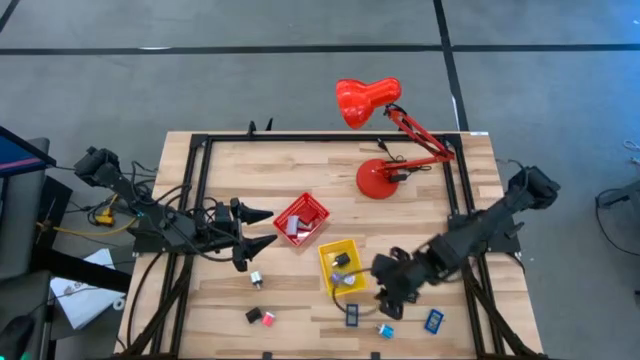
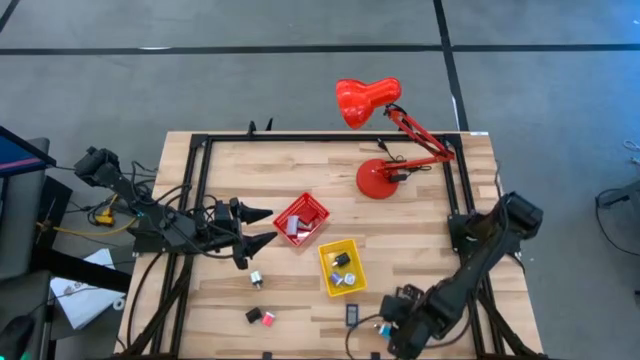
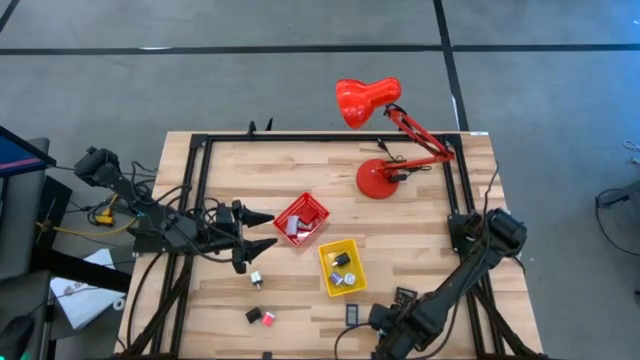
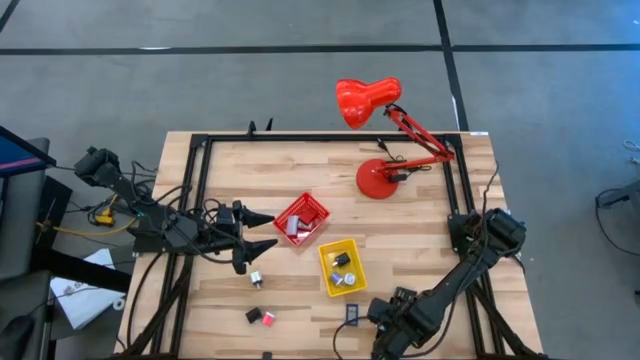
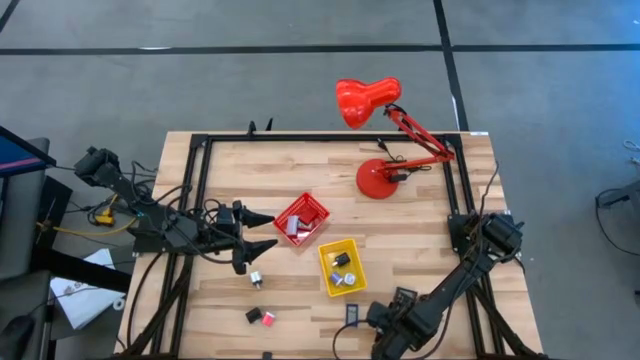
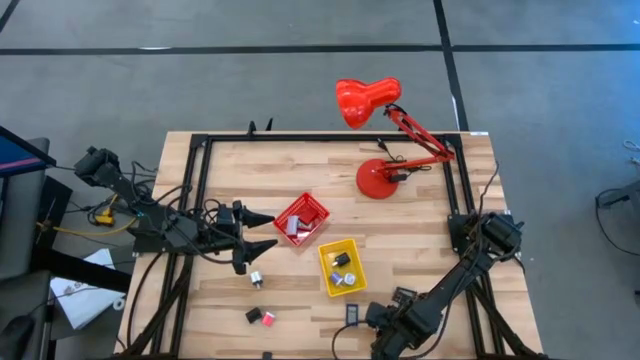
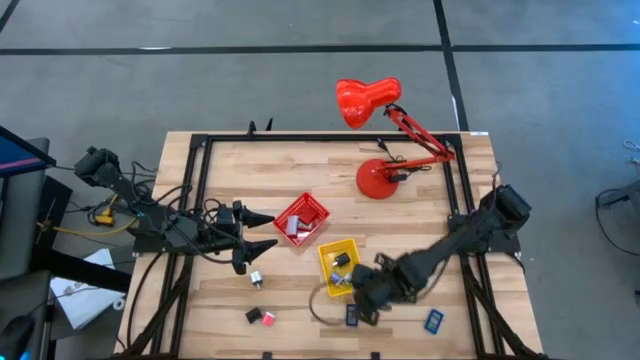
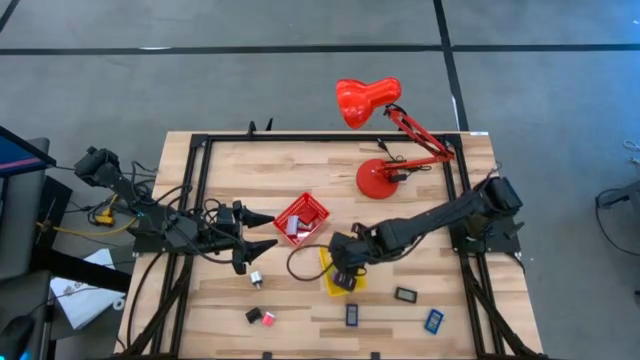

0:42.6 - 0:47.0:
Task: Pick & Place Office items
Put the blue charger adapter into the yellow basket

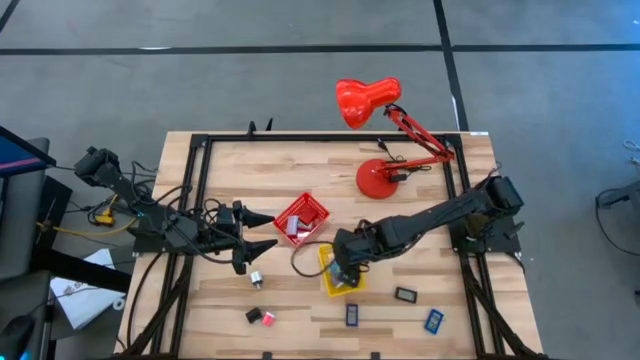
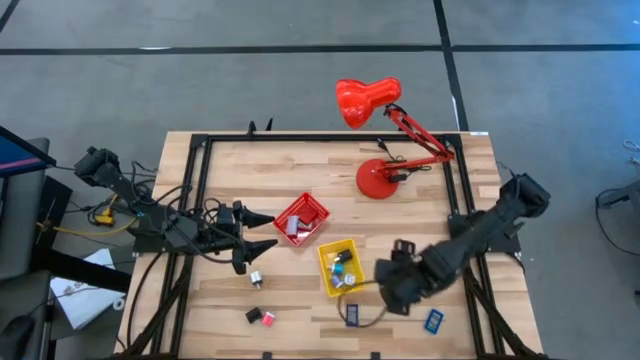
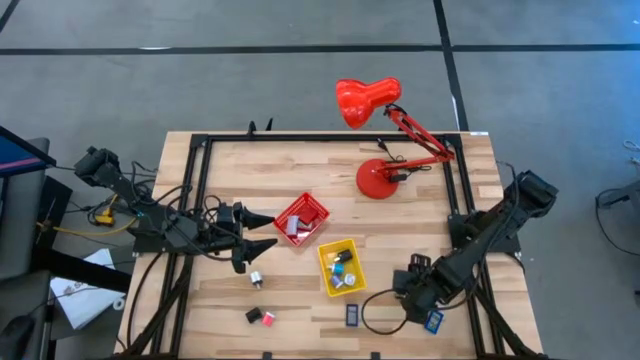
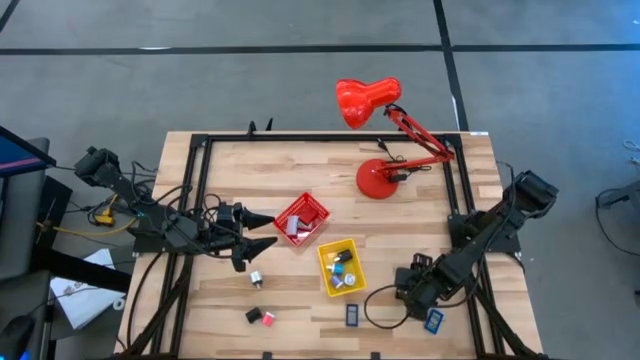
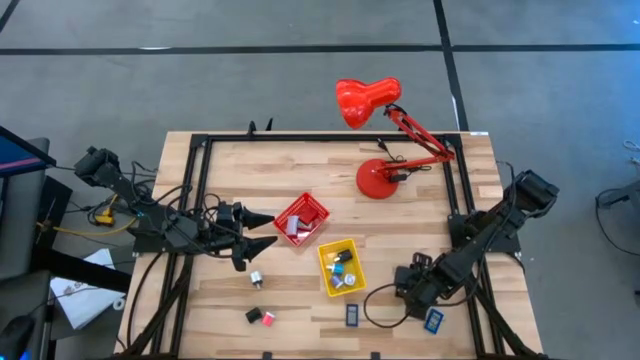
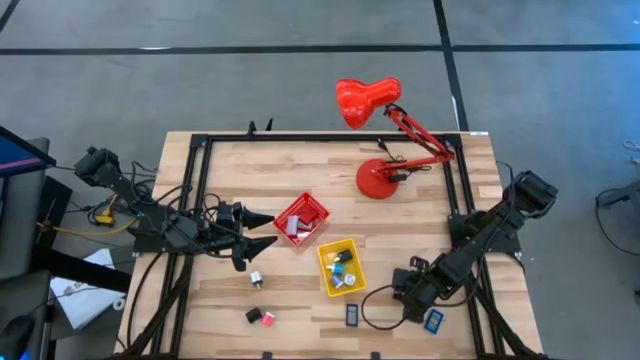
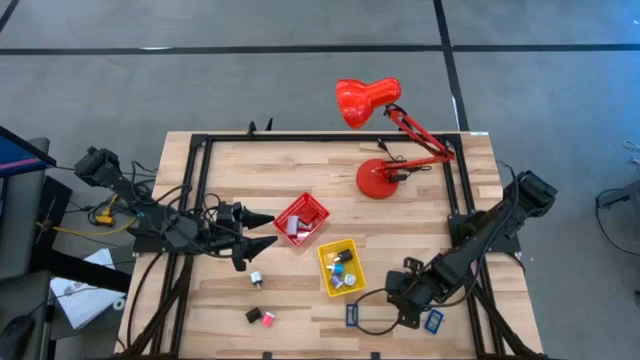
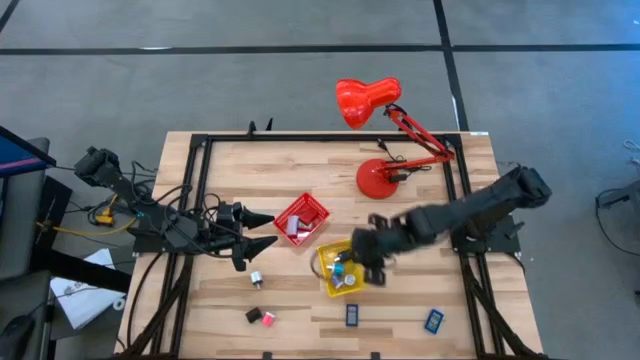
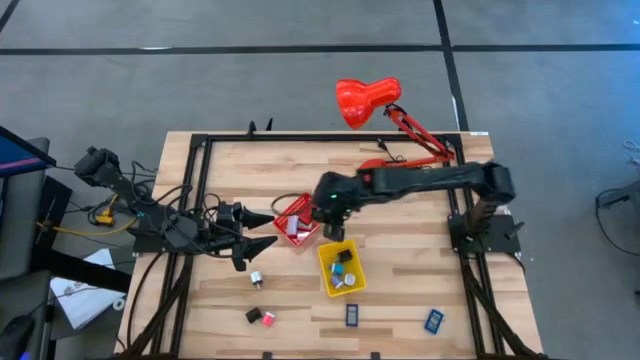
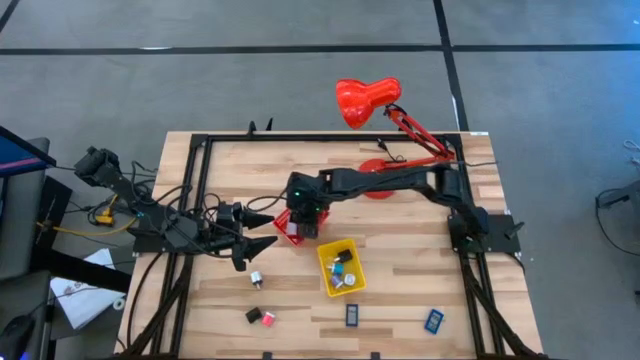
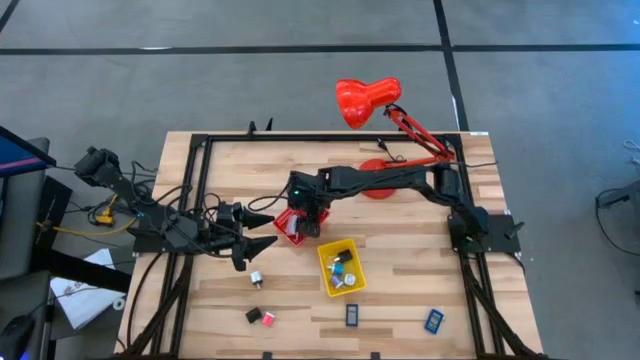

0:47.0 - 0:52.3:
Put the black digital clock into the red basket

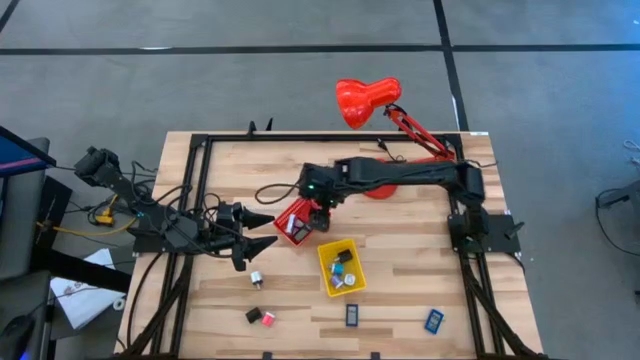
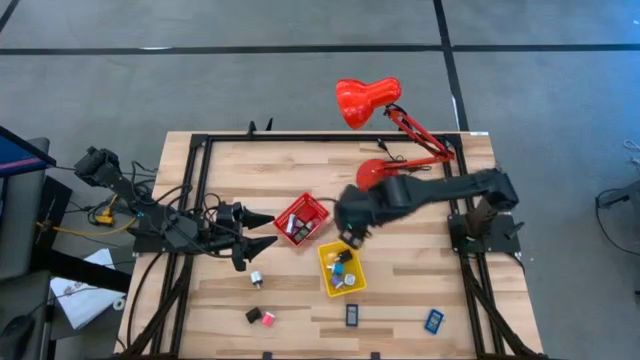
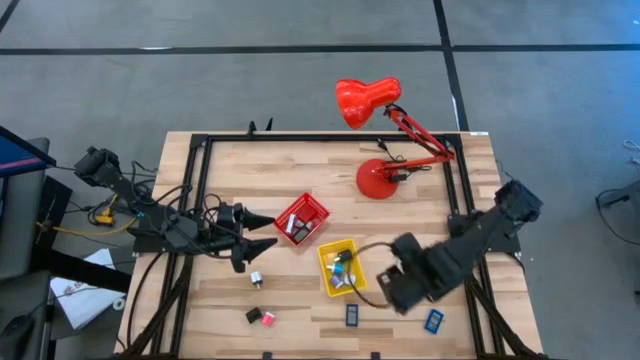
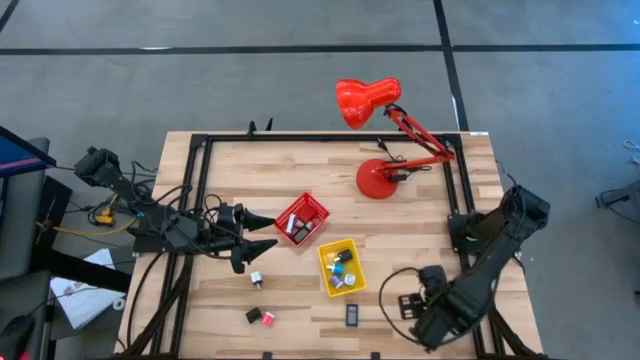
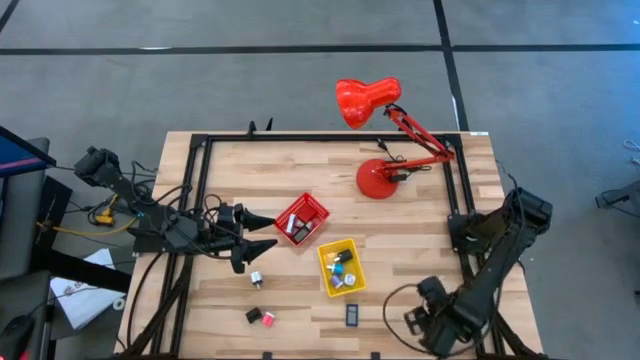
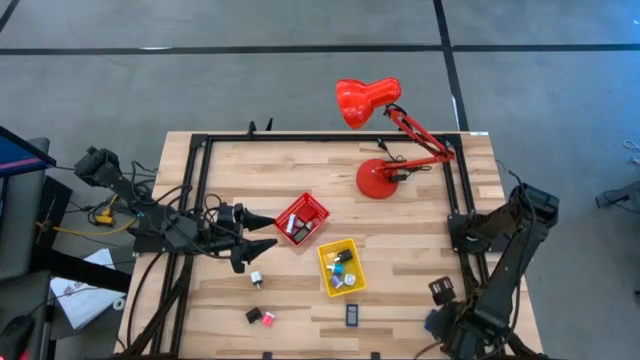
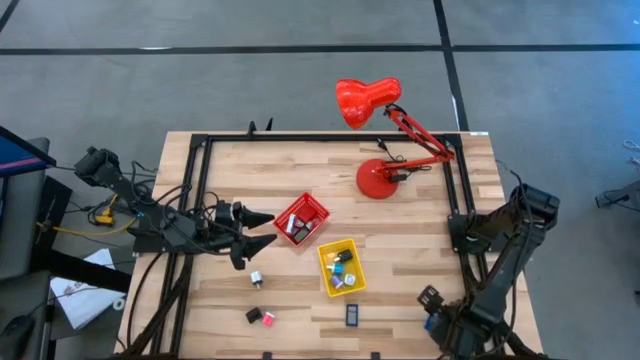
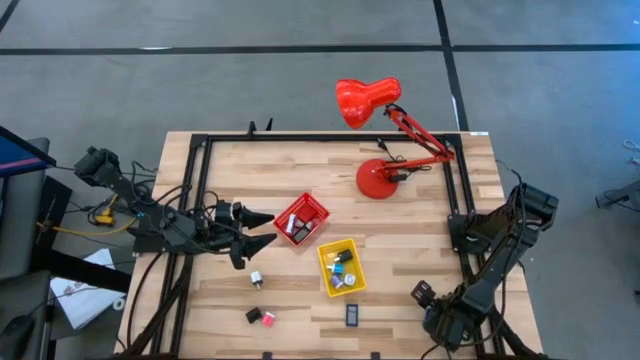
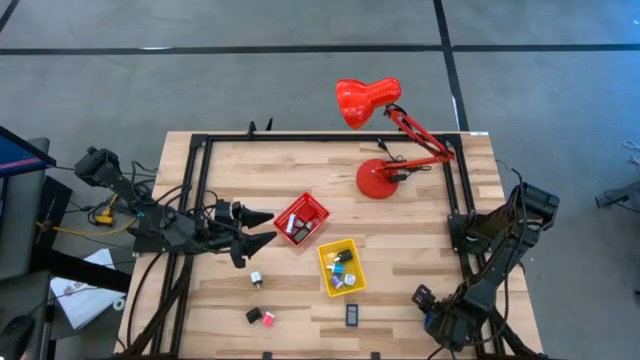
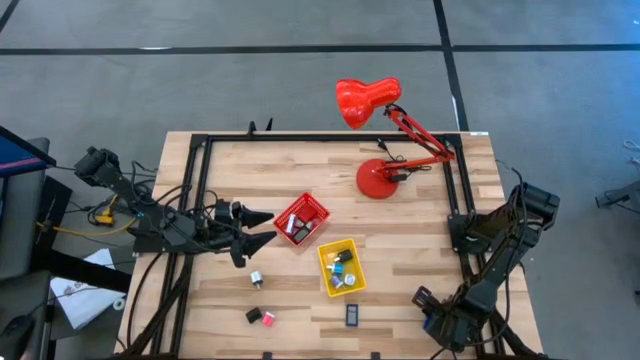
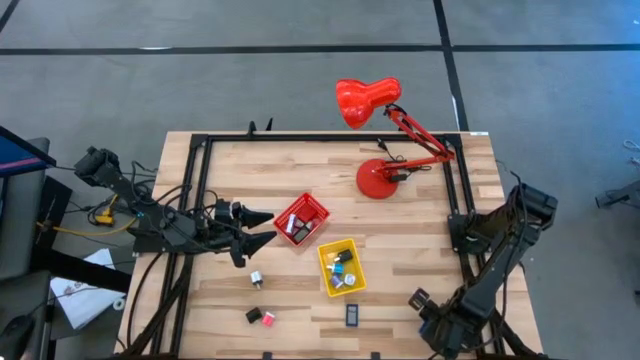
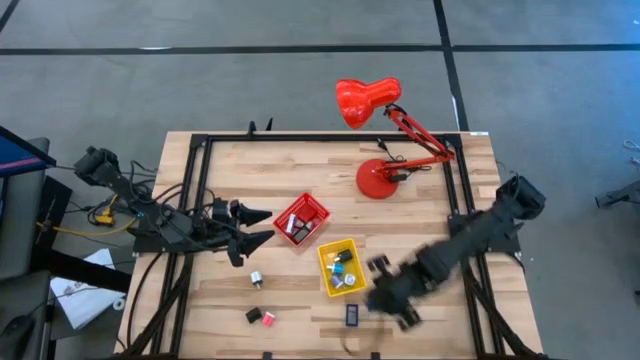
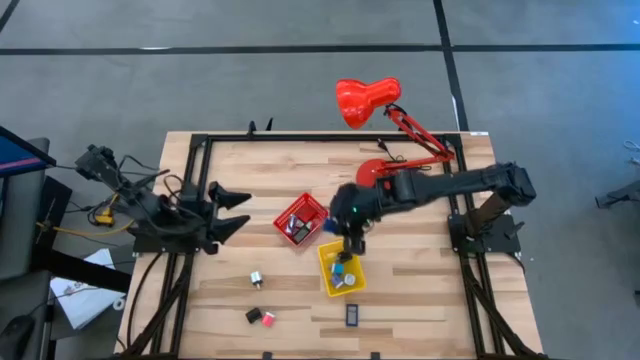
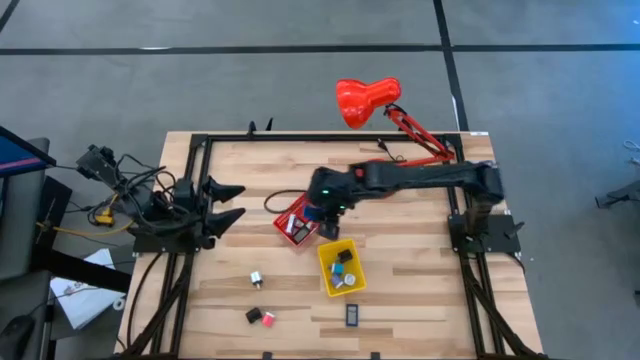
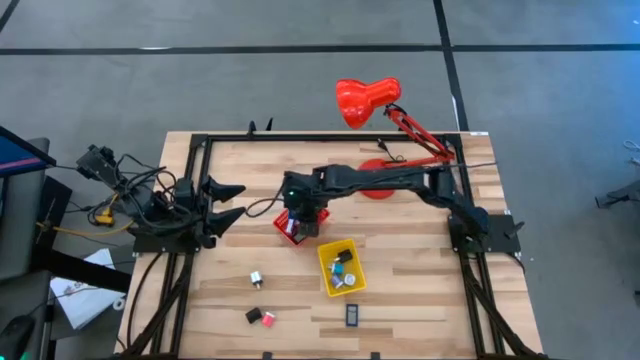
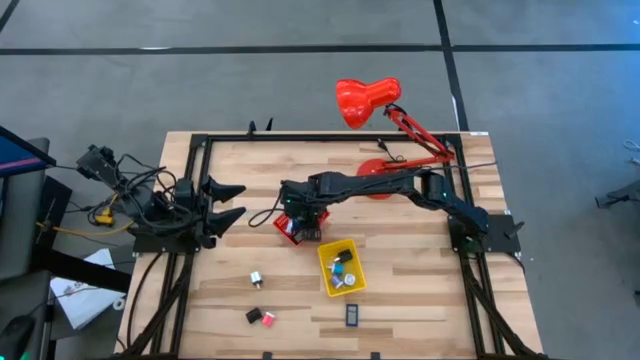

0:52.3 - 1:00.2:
Put the right blue digital clock into the red basket

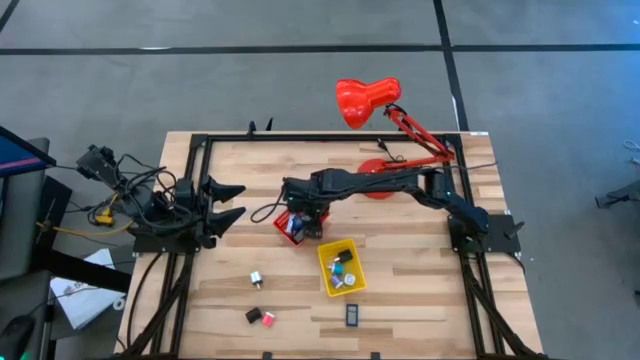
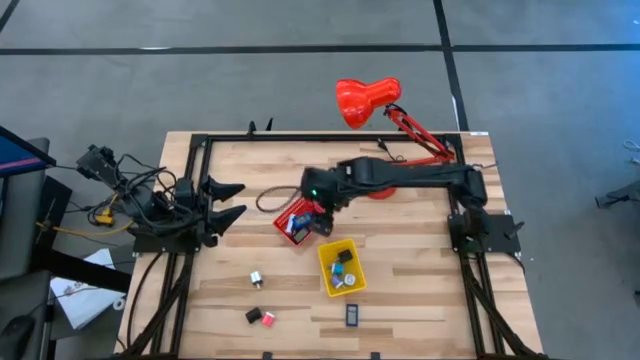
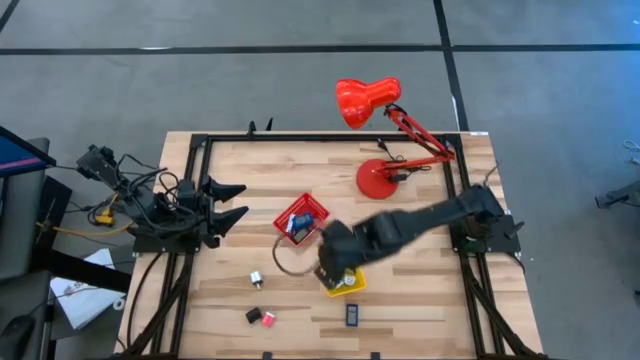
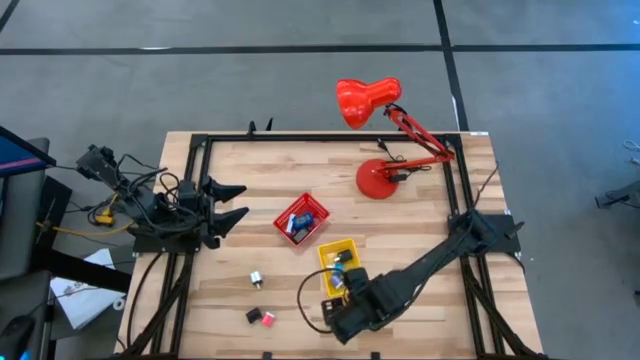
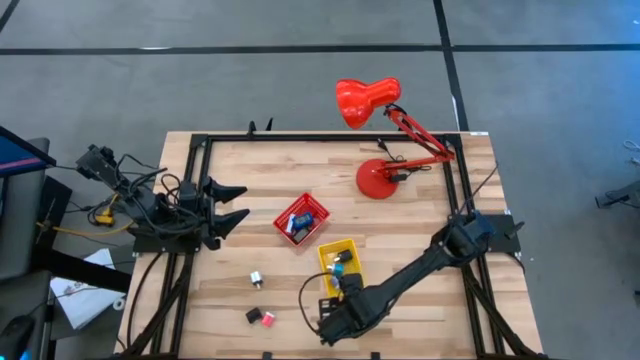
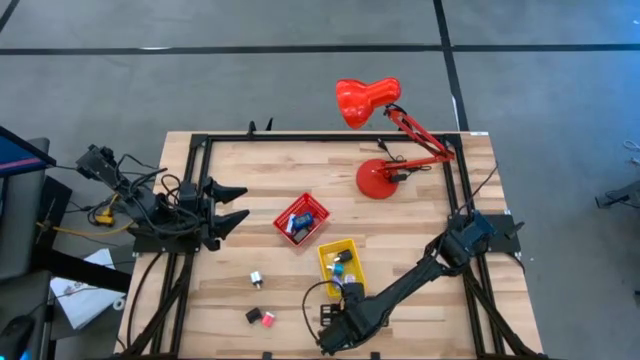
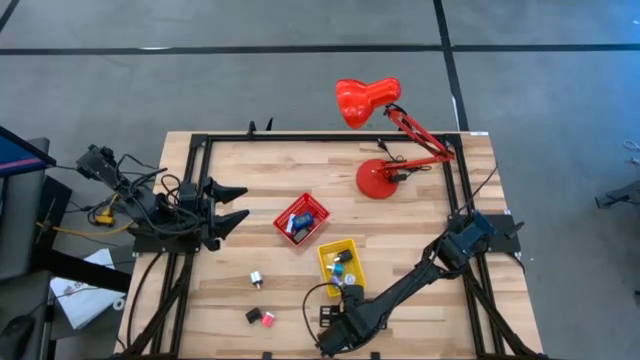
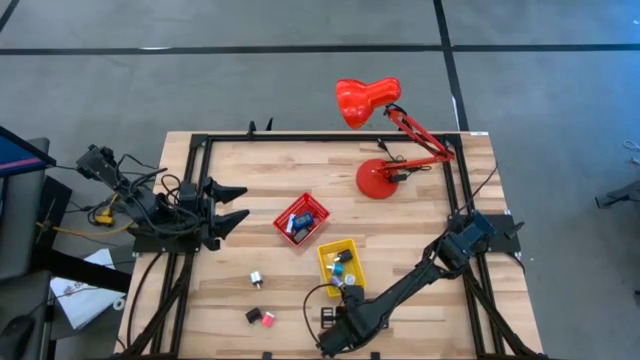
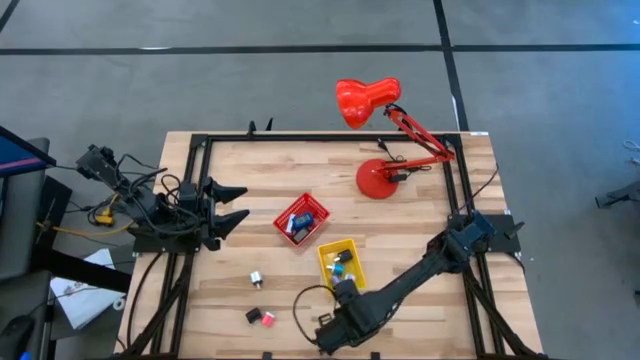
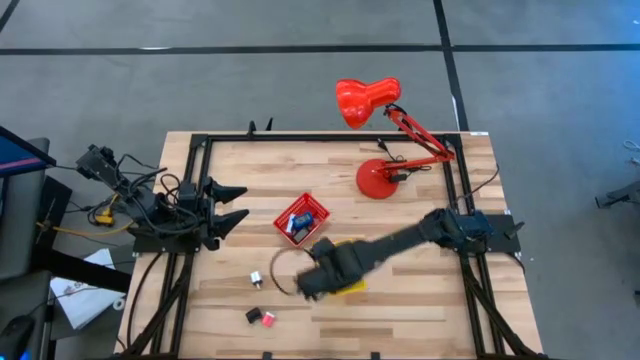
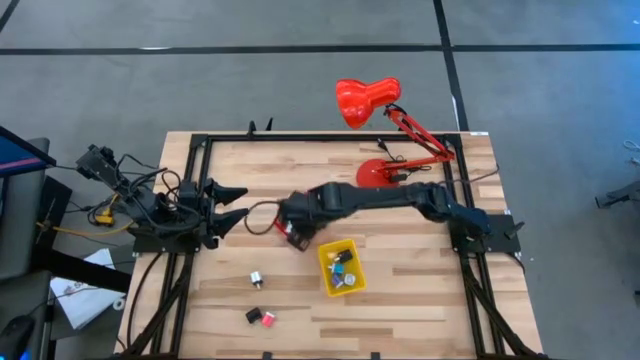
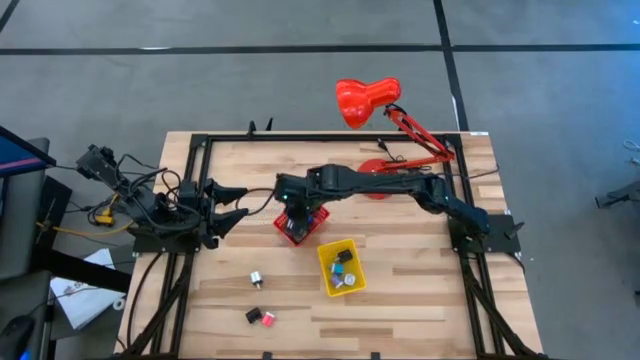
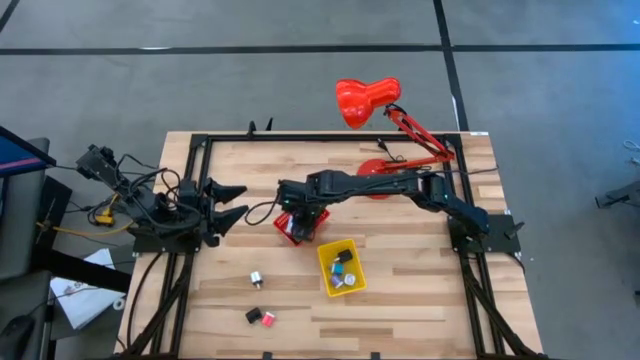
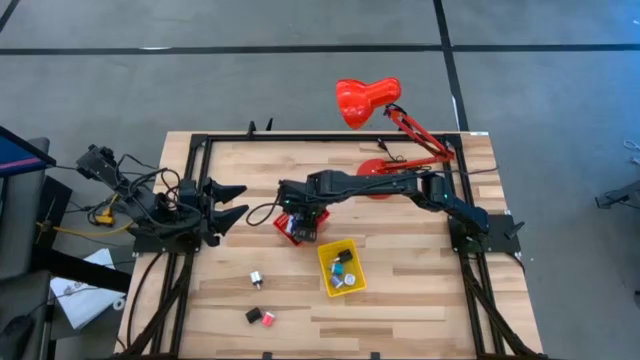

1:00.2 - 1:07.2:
Put the blue digital clock into the red basket
